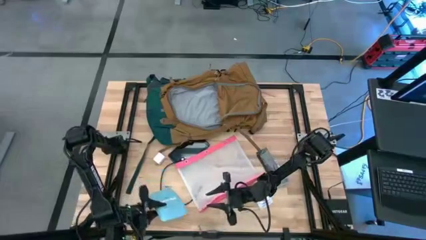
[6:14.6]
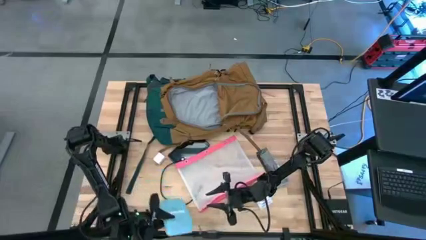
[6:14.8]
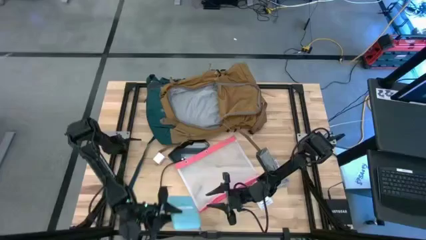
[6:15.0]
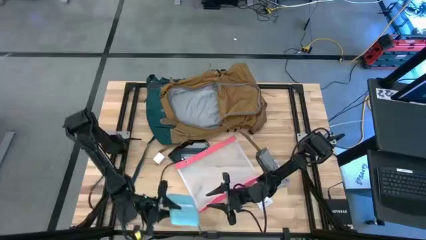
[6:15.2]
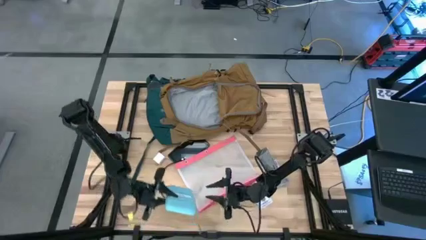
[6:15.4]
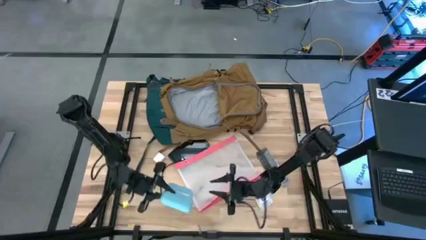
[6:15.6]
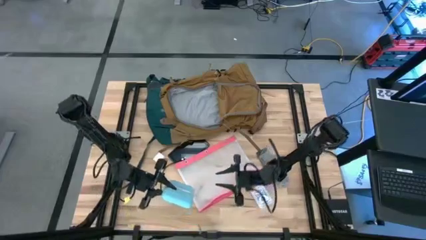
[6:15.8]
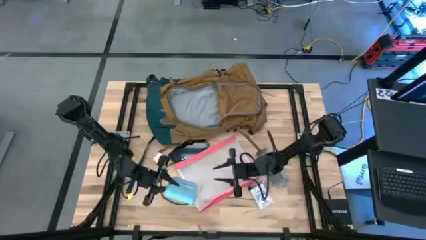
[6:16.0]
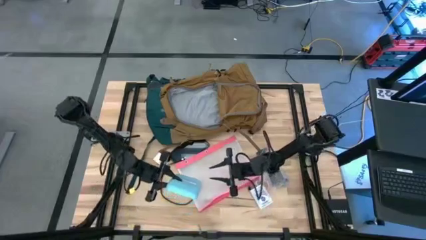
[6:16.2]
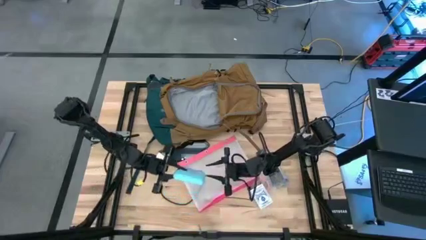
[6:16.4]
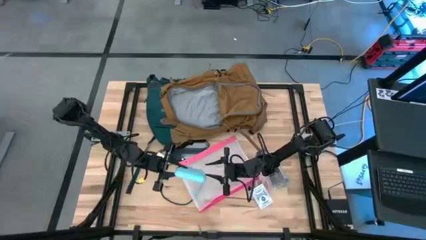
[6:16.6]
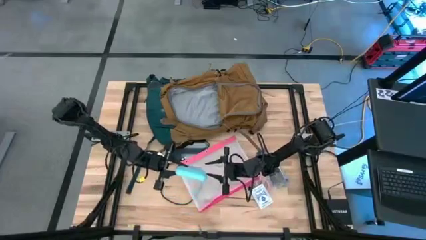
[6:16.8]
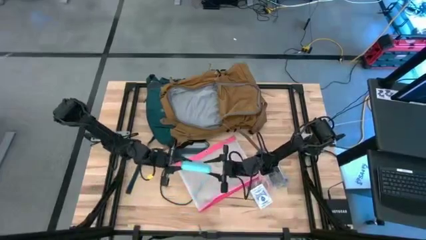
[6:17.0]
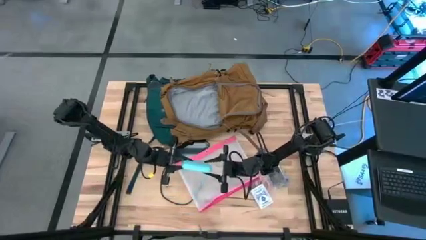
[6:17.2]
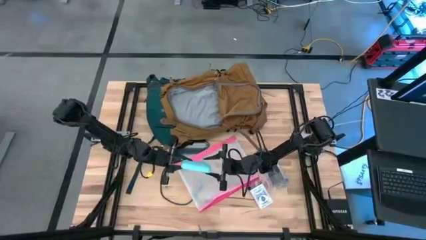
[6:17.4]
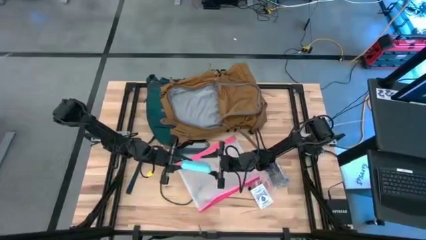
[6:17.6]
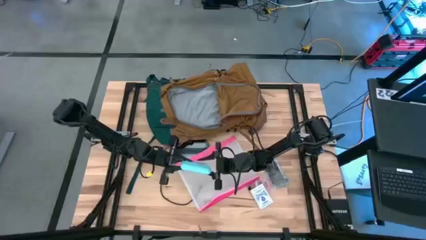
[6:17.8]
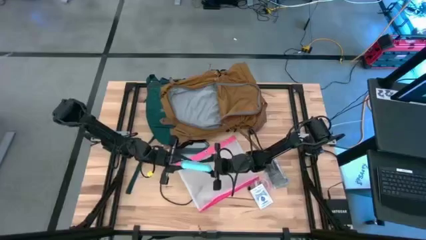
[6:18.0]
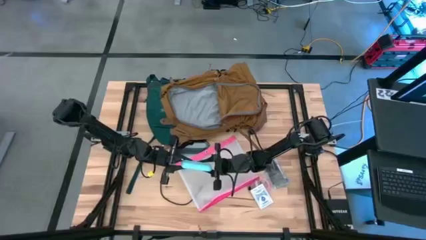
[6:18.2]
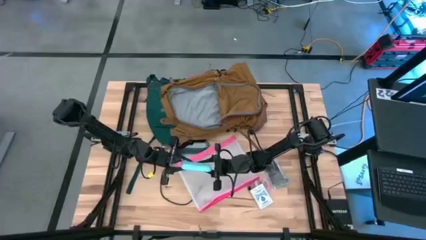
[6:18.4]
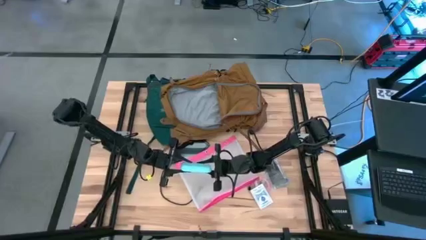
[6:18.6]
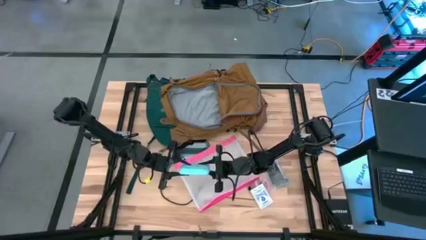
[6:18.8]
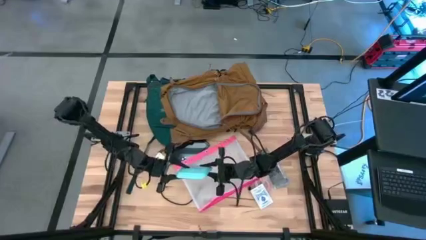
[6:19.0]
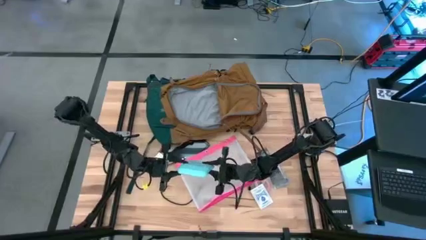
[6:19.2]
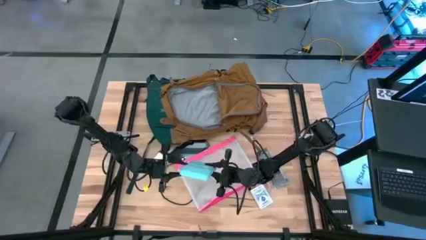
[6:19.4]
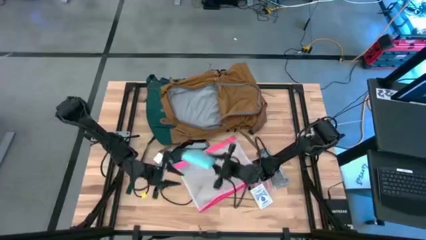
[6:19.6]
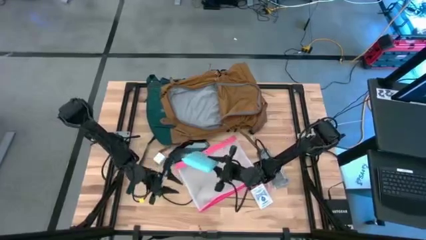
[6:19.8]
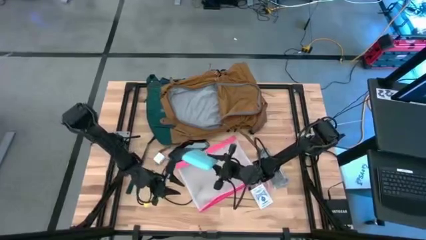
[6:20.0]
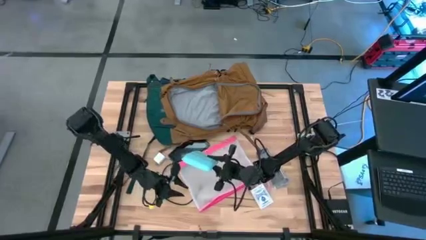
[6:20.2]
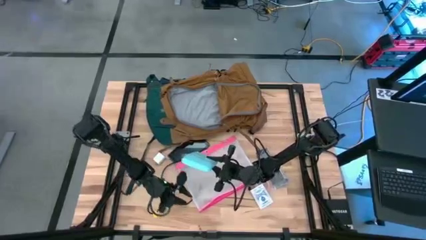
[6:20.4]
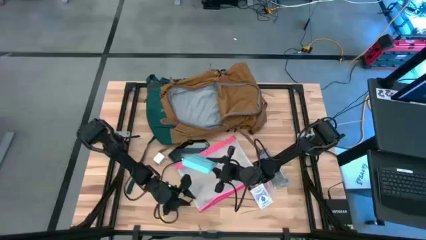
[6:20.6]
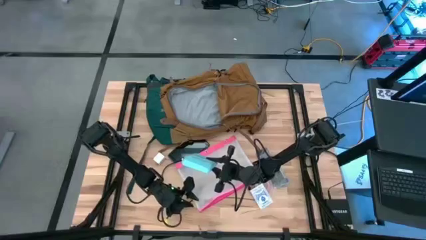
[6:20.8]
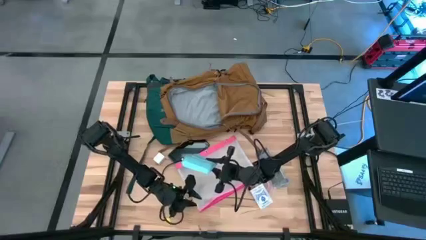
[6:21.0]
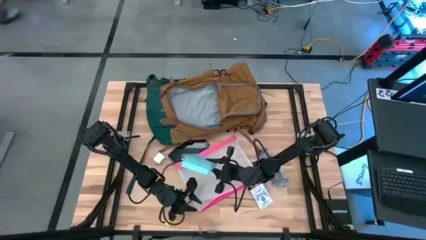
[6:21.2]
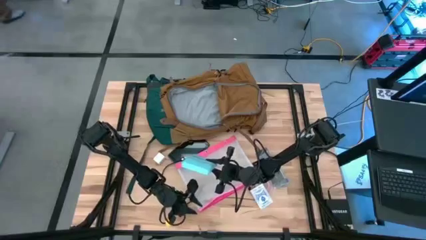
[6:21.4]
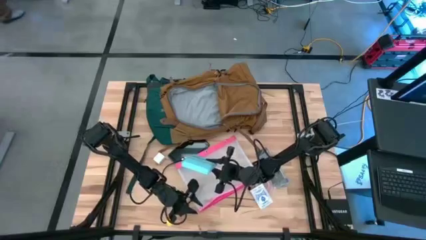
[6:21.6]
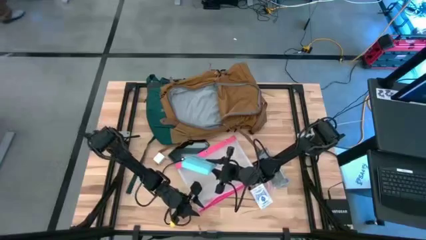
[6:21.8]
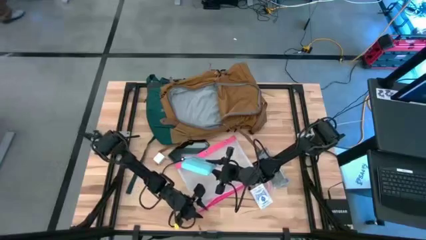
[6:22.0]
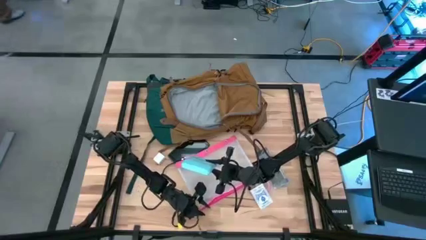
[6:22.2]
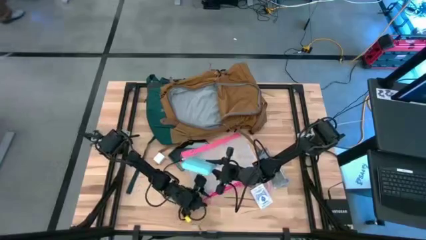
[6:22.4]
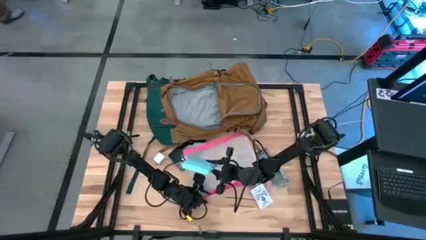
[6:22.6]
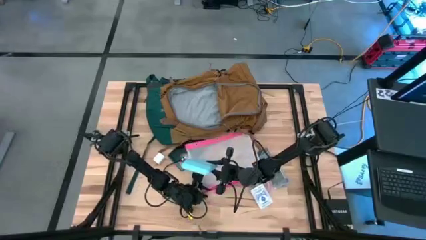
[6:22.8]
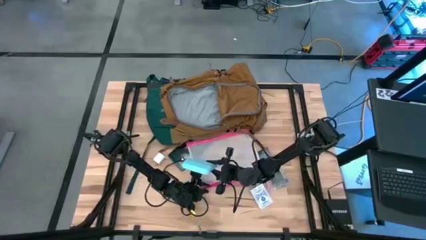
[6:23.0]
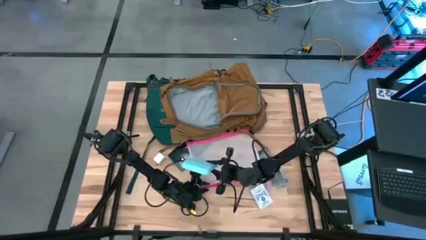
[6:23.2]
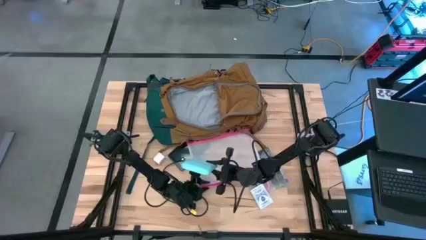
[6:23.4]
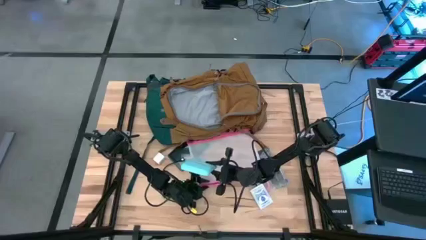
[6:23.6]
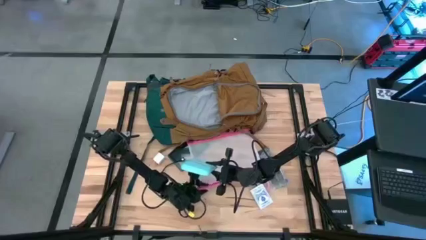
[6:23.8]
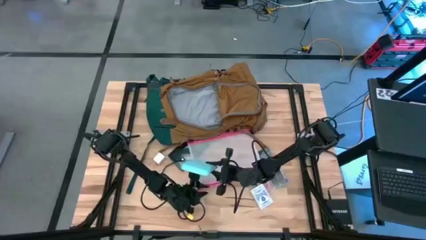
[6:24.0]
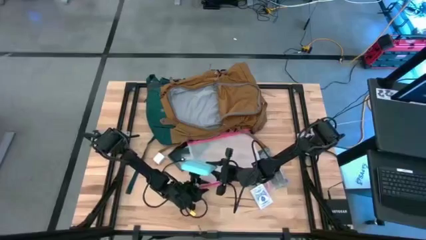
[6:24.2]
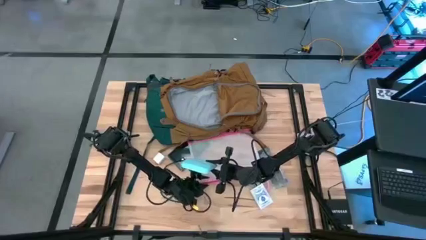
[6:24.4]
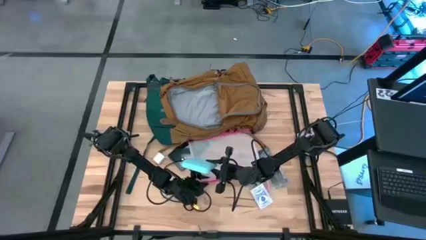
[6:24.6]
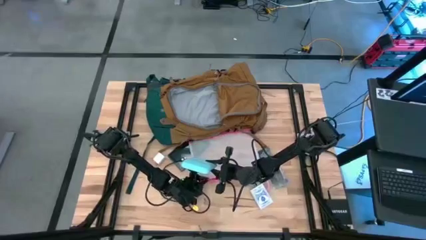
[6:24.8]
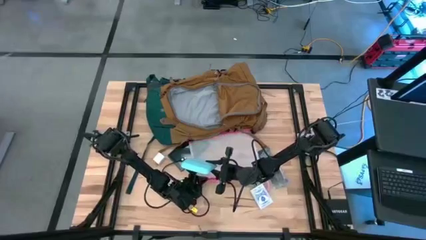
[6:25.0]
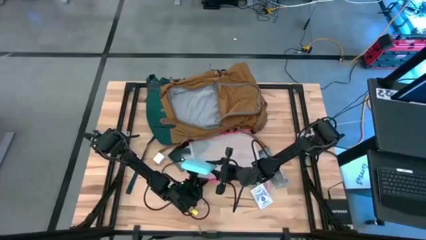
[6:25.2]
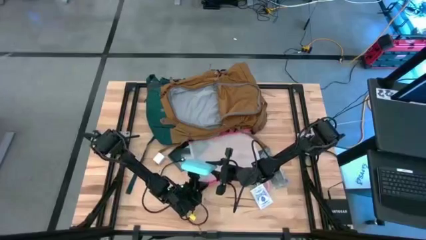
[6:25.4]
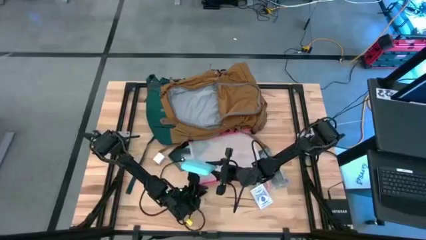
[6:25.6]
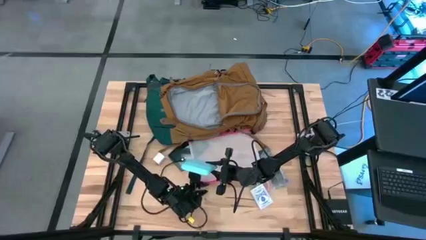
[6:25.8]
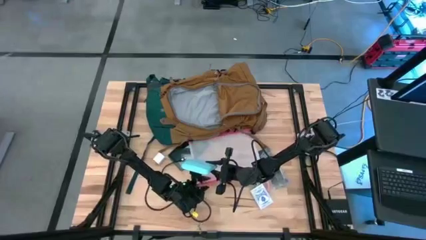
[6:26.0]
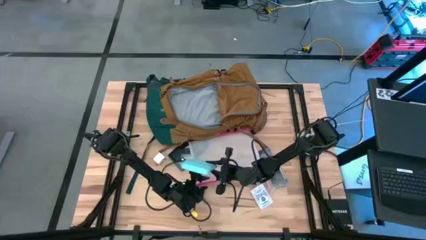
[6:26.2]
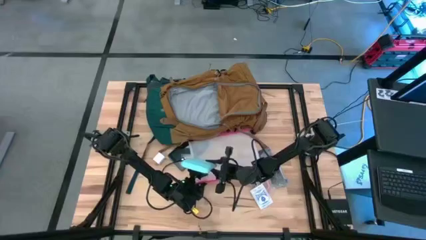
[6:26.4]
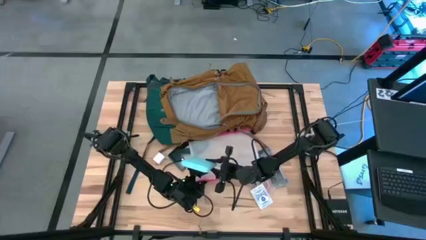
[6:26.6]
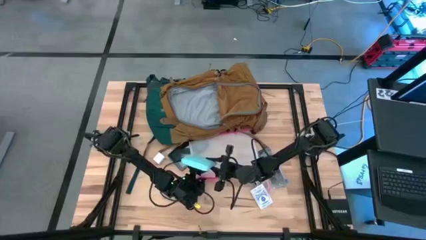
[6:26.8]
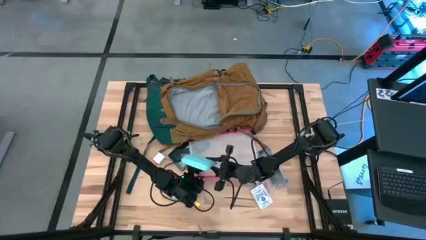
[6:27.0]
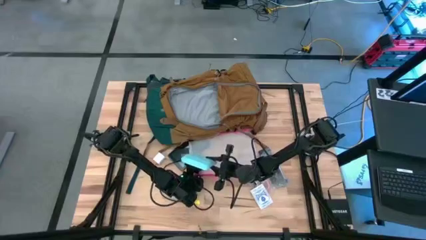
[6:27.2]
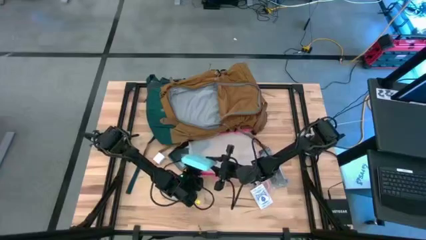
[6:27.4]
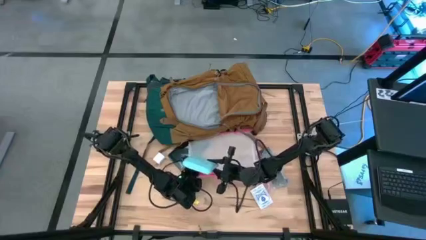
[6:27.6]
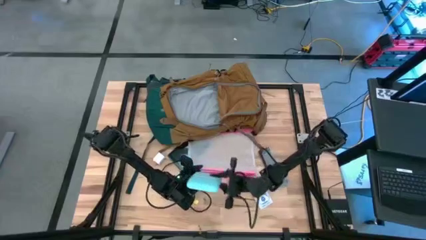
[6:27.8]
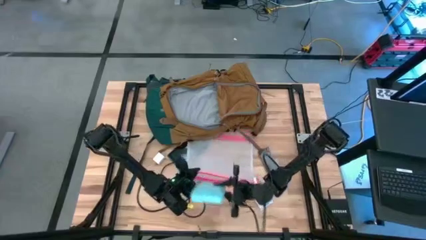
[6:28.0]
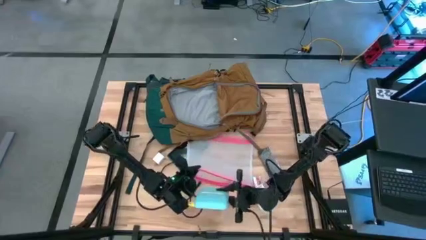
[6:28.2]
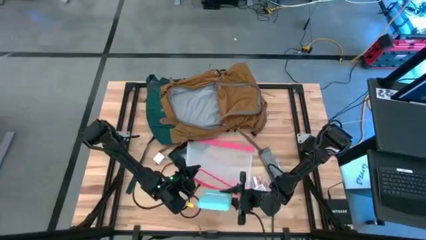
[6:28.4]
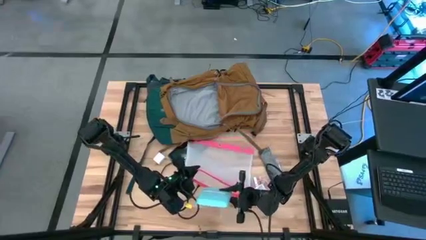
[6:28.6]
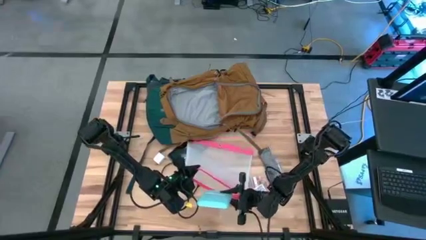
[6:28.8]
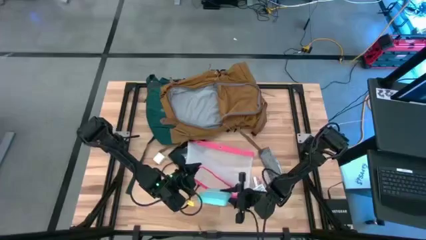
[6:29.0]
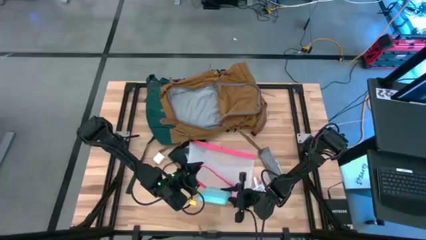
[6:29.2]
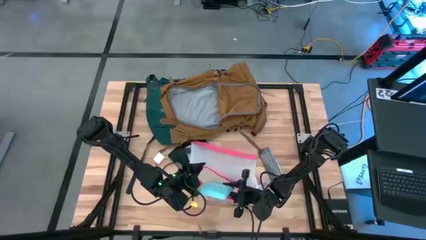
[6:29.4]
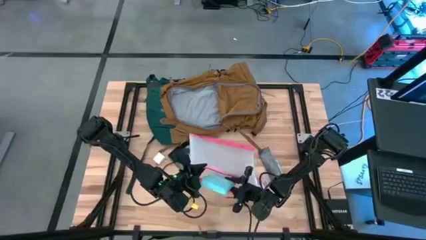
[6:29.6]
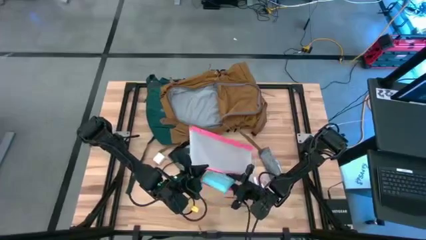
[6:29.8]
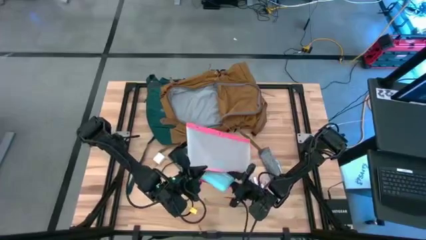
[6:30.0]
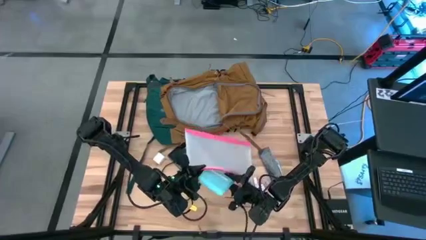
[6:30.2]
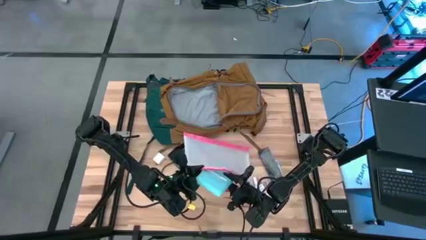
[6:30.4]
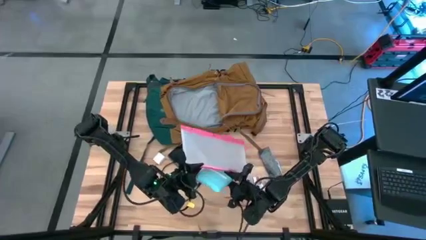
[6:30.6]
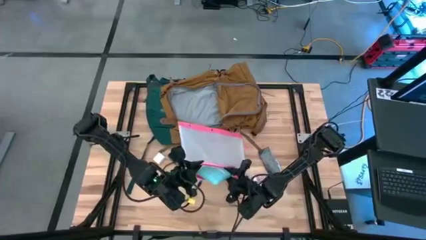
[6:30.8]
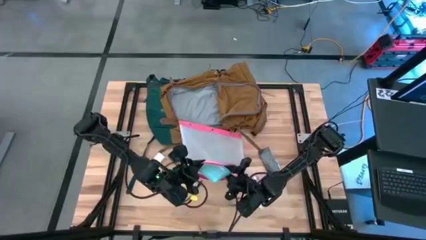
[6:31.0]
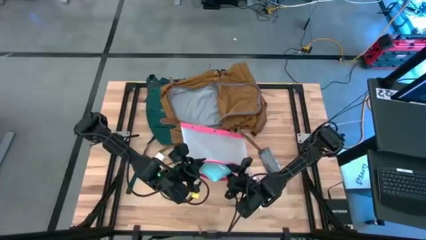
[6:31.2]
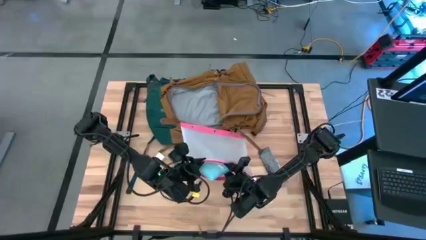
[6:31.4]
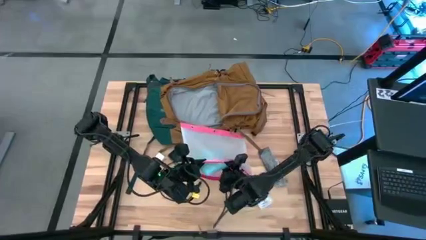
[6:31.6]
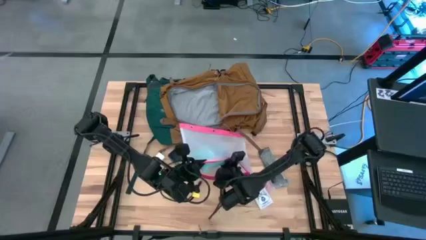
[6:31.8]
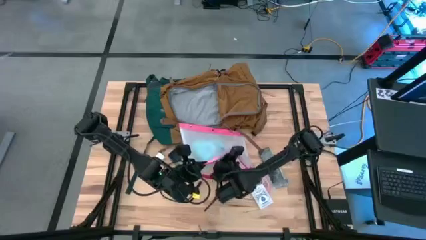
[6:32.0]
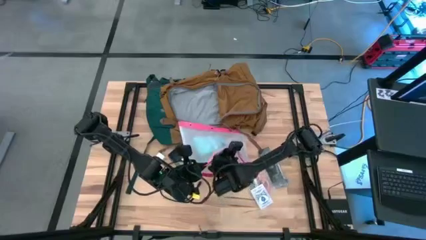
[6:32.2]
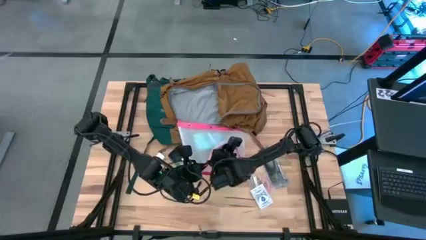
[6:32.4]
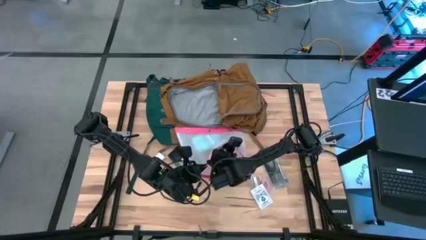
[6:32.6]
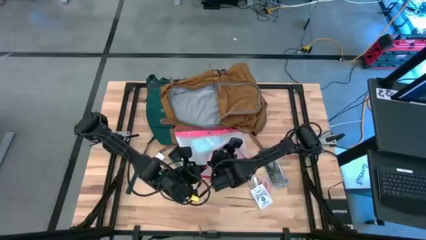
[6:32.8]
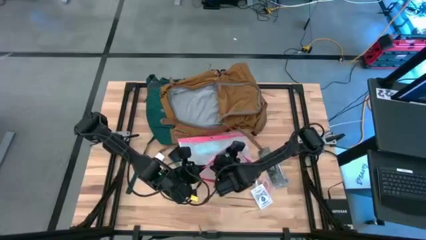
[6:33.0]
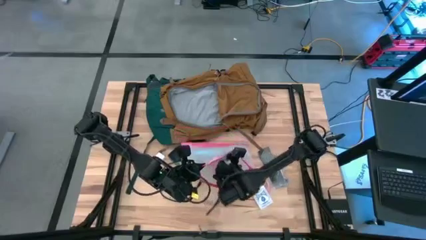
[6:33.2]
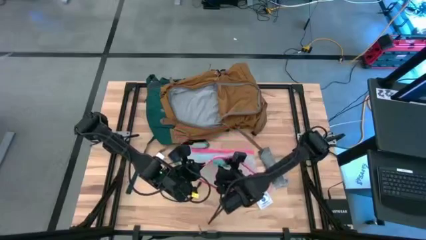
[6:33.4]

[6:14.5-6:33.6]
Task: Unpack backpack
Put the blue calculator into the pink zipper pouch
